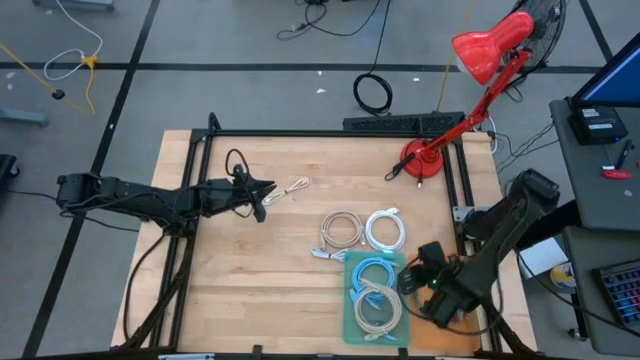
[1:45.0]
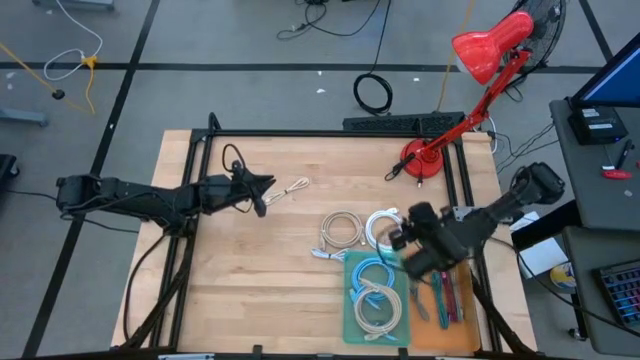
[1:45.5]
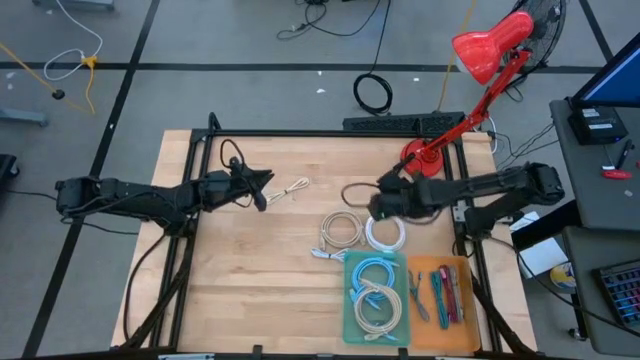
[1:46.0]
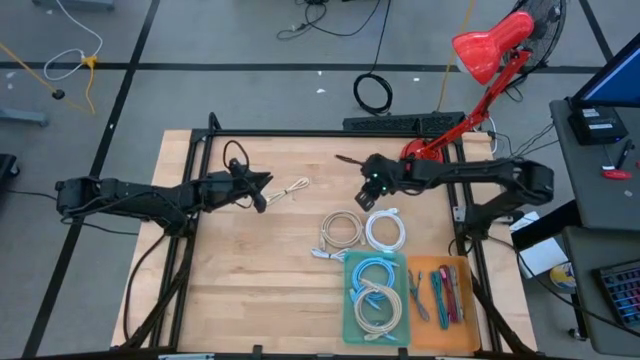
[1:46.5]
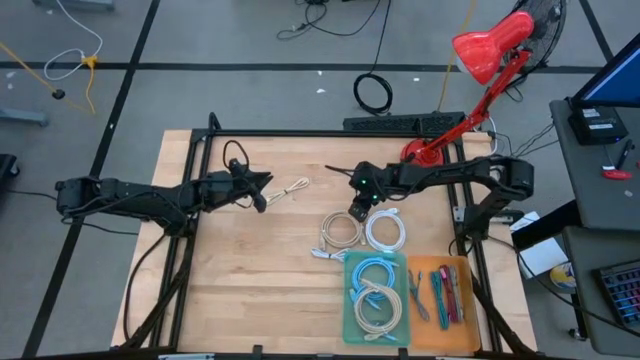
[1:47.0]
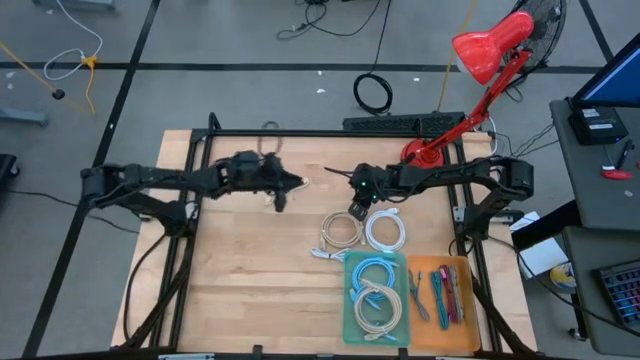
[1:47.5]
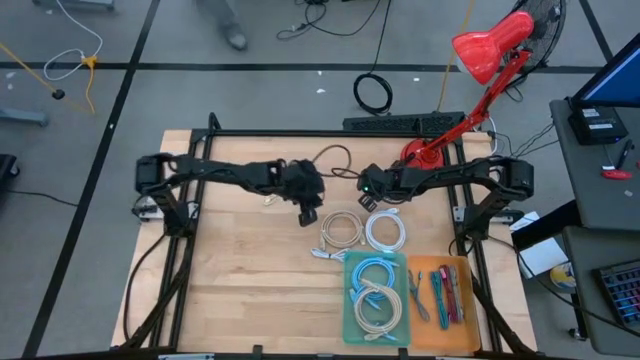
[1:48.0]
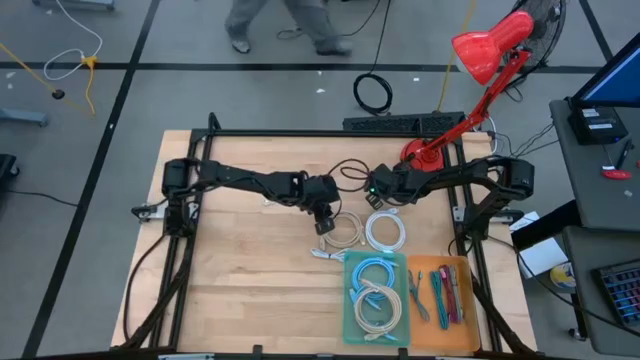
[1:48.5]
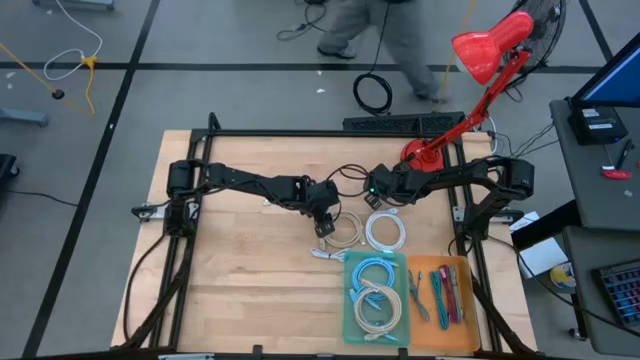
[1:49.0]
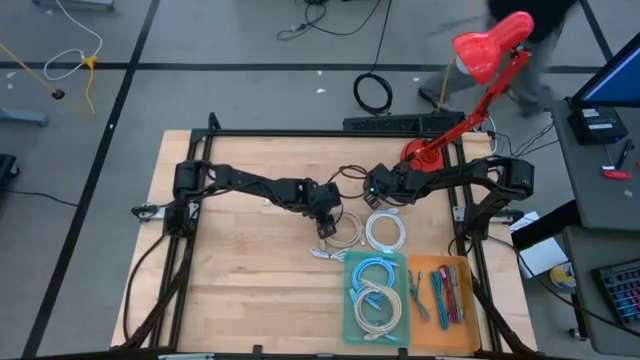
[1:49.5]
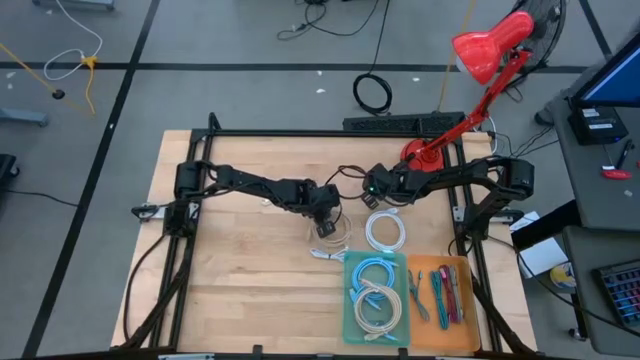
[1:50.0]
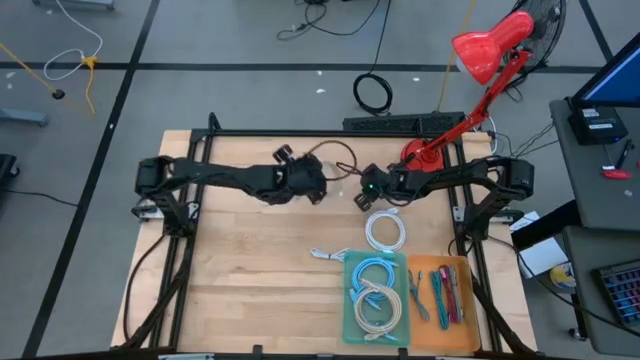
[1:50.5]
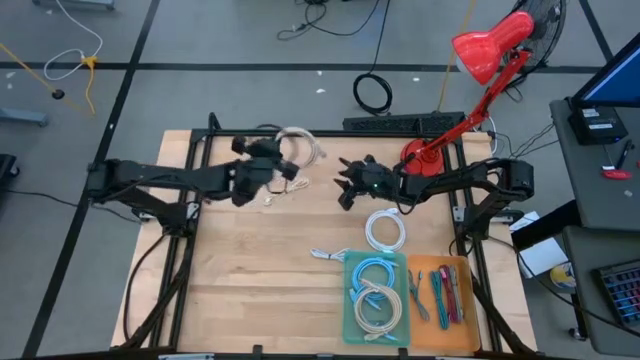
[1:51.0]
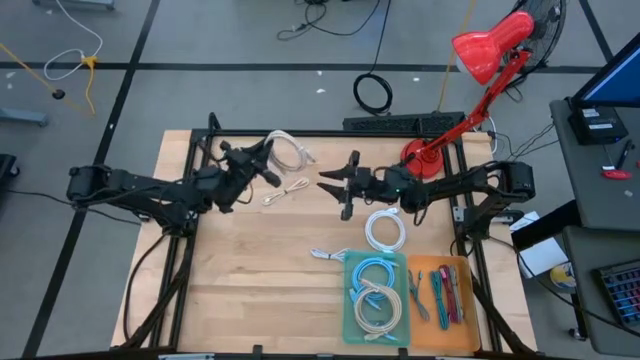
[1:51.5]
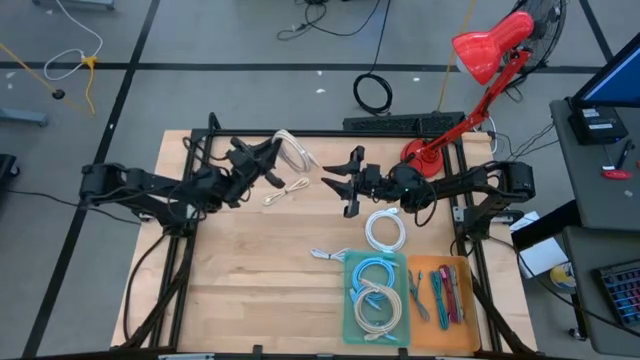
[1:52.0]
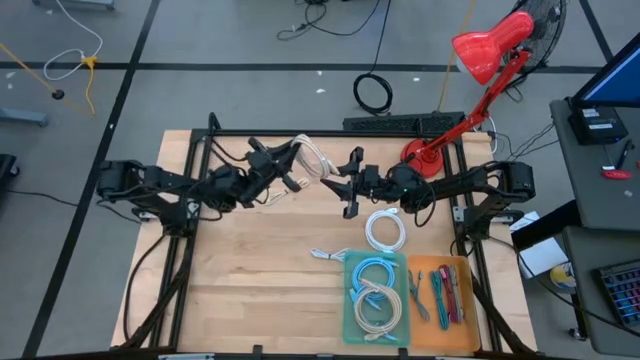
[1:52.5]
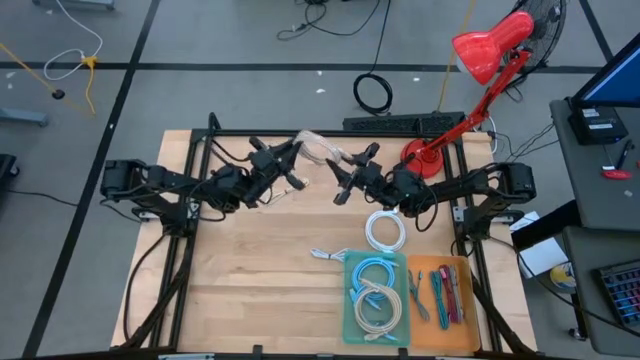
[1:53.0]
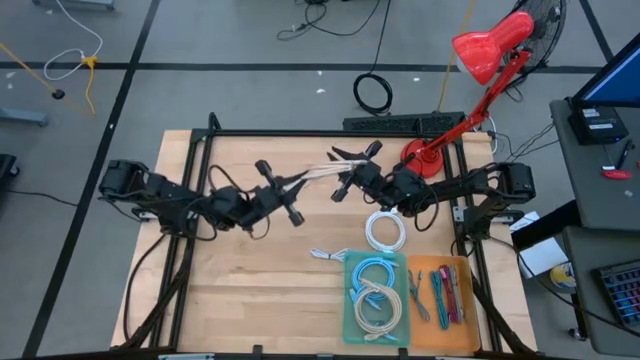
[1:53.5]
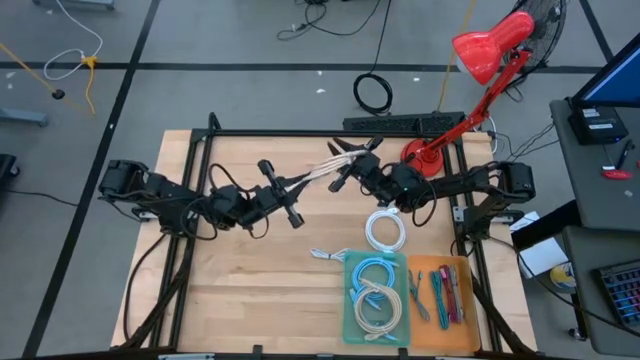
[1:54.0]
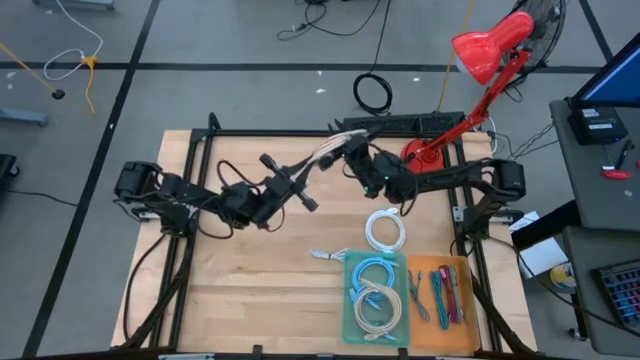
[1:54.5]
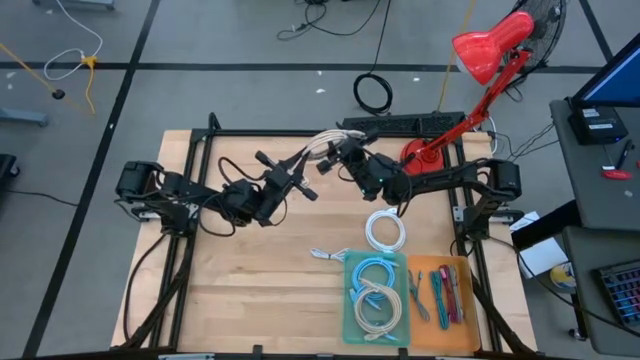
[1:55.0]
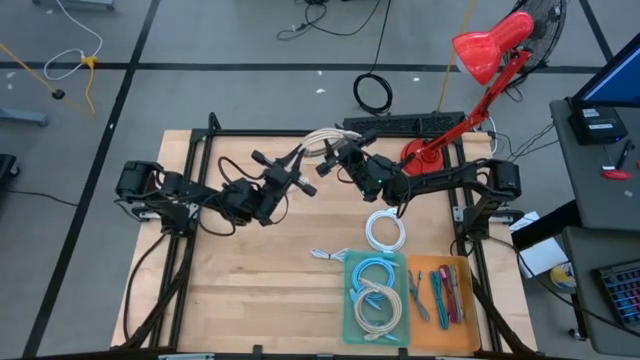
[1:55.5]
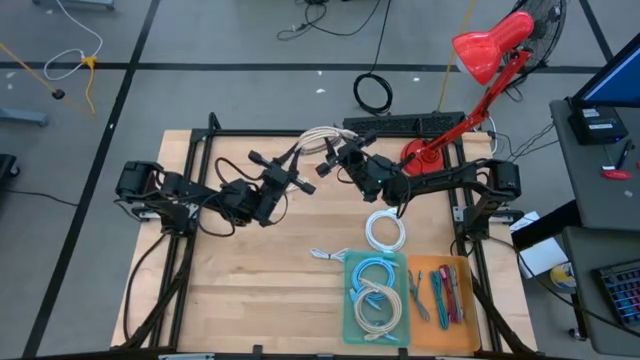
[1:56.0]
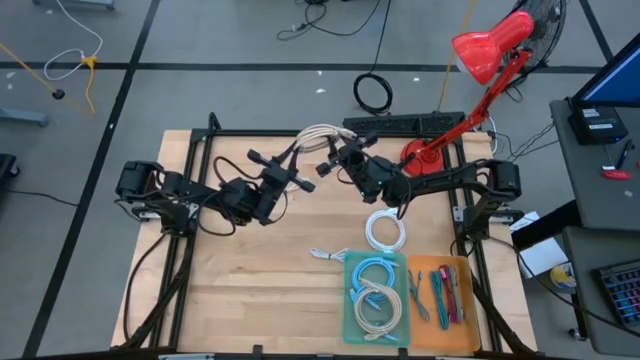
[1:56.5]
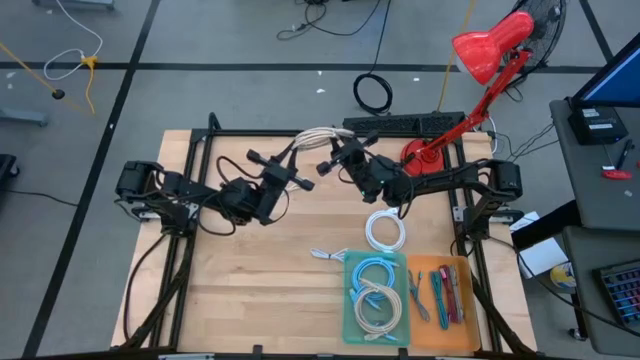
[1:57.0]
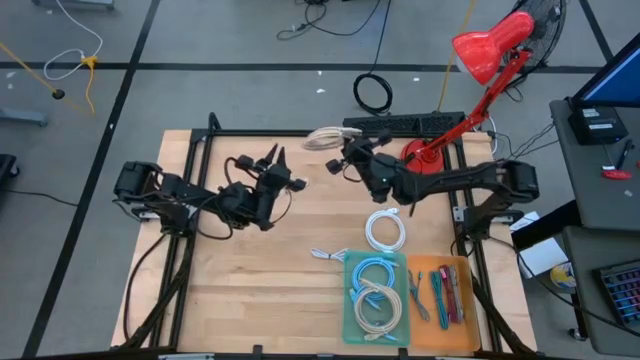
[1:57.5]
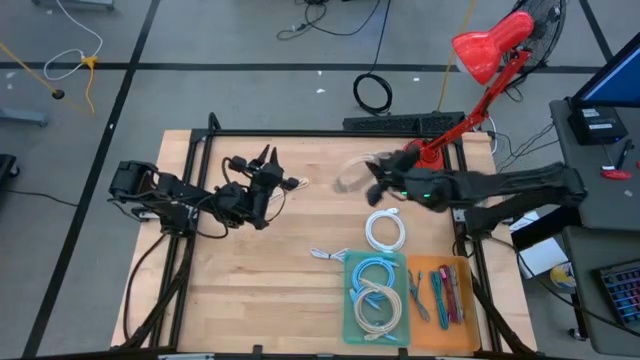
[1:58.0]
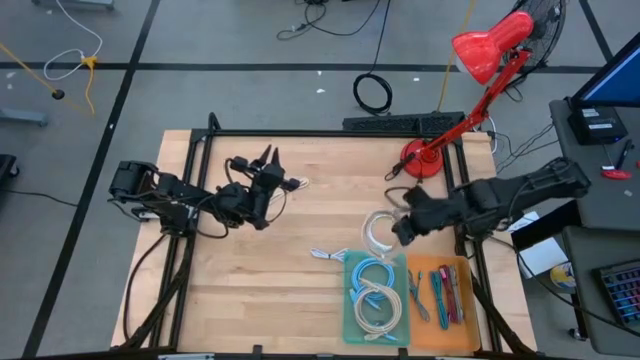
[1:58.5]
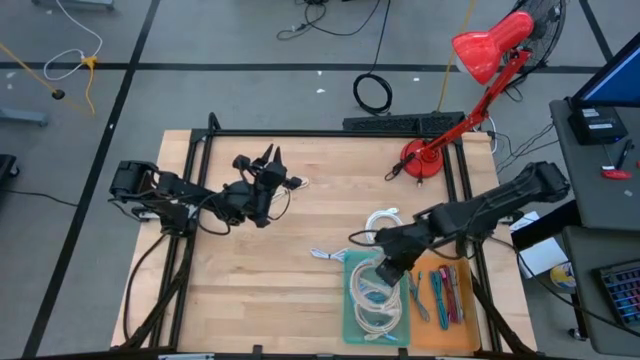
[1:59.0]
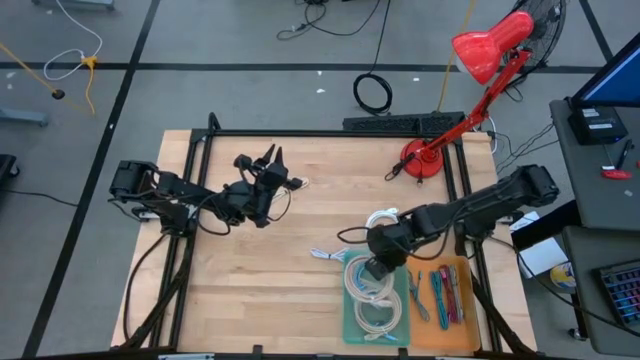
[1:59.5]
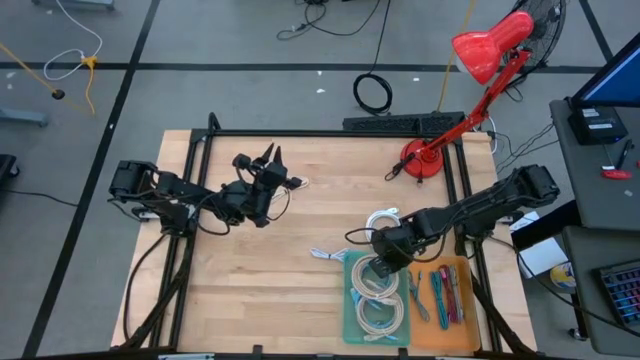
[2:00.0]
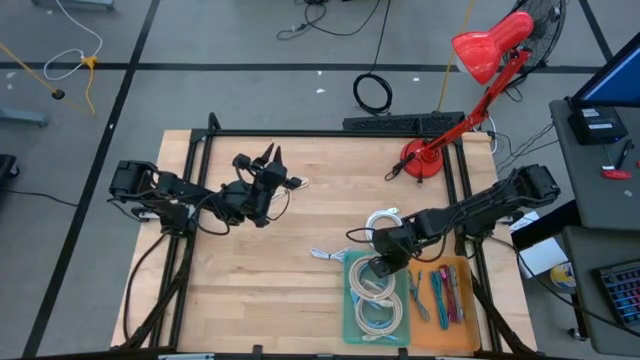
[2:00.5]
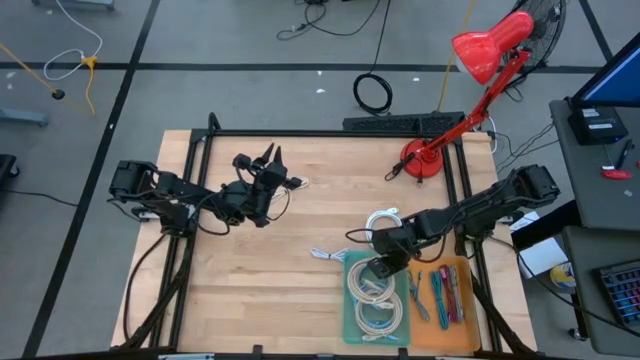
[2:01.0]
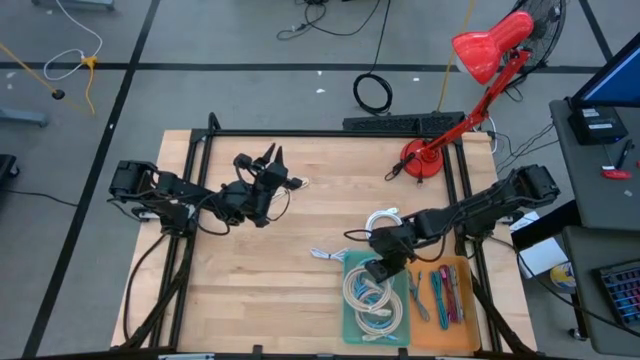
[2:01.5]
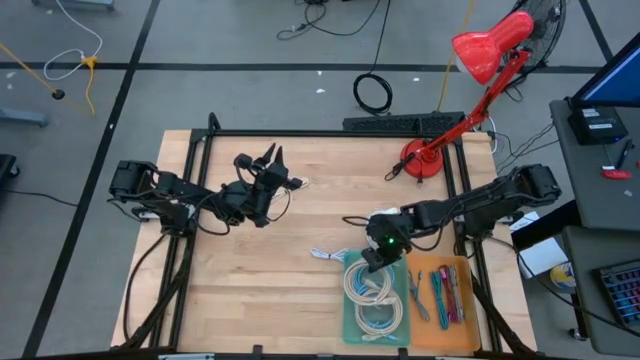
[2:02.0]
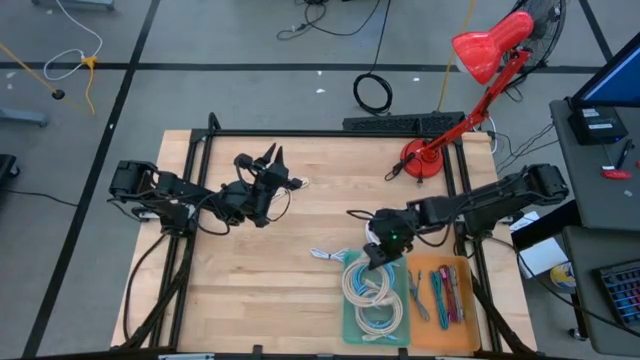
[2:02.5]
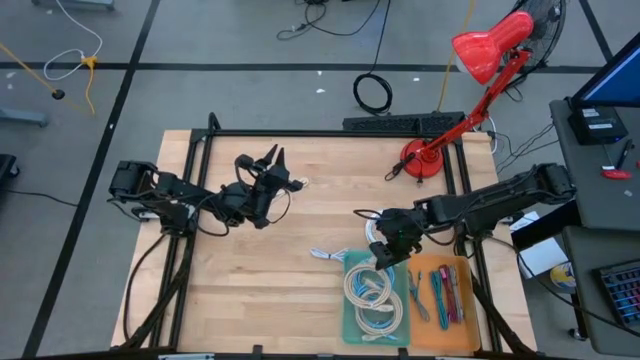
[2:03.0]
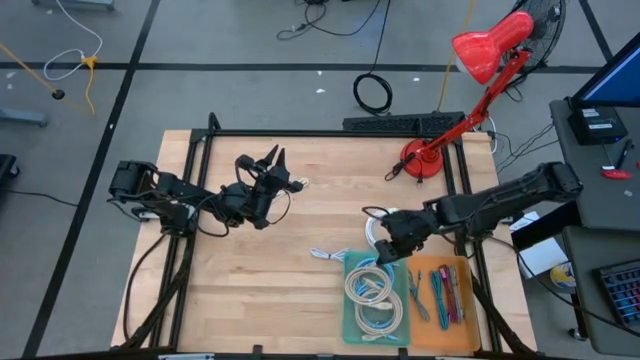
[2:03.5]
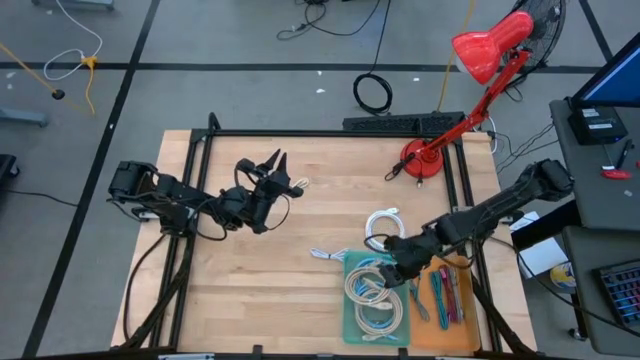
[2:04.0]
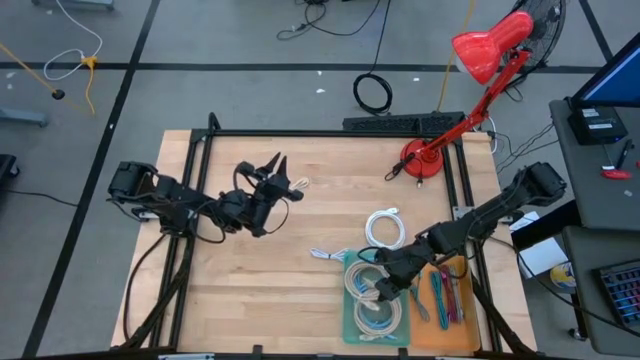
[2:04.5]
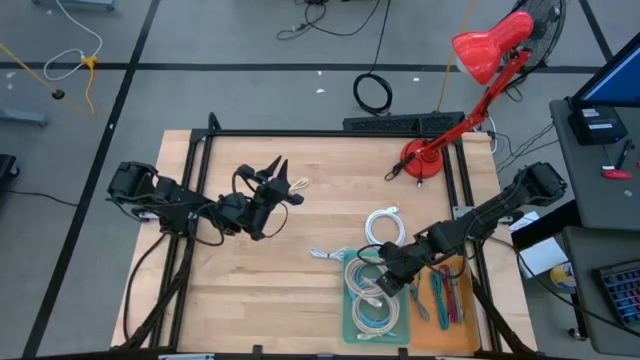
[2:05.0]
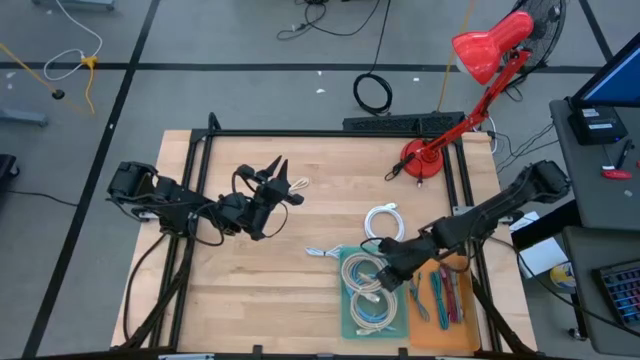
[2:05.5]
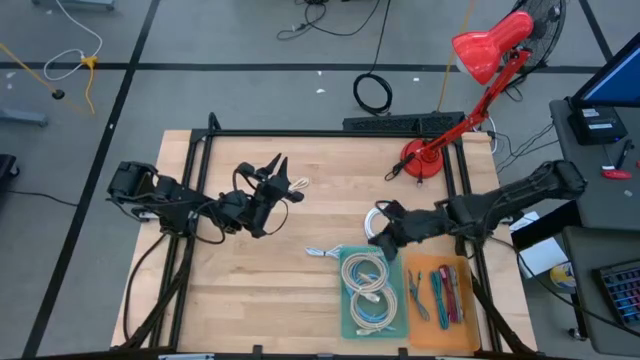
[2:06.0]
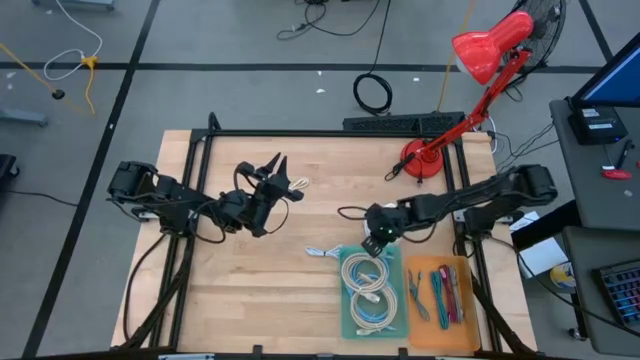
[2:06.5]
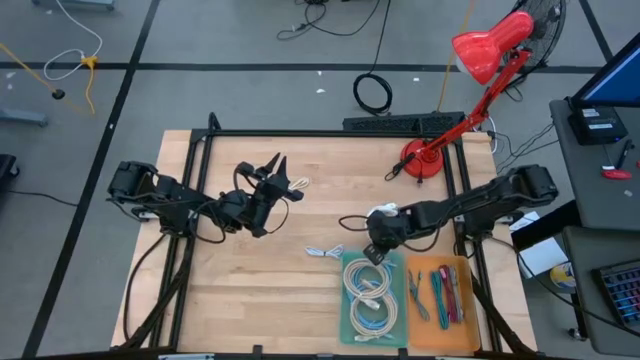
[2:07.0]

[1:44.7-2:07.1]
Task: Pick & Place USB Port
Put the brown charger cable into the blue bin
